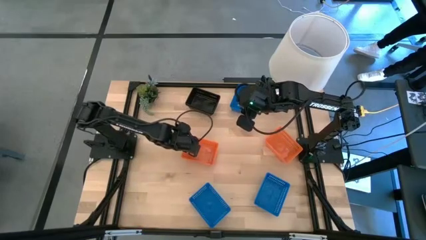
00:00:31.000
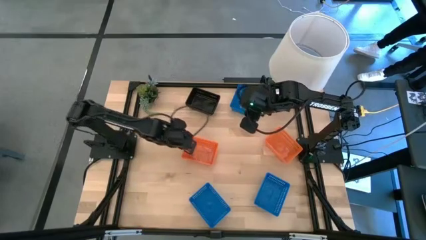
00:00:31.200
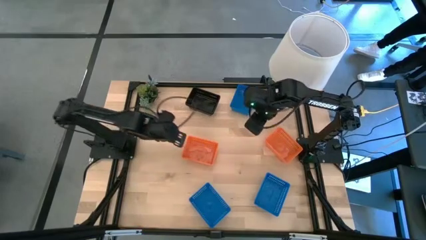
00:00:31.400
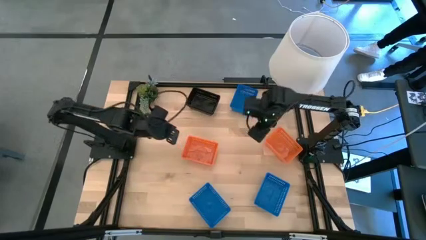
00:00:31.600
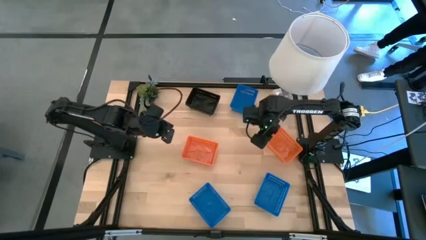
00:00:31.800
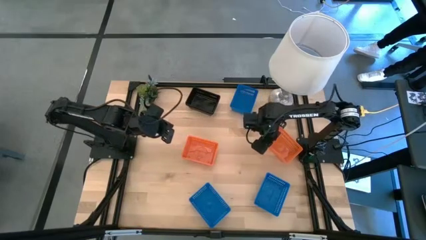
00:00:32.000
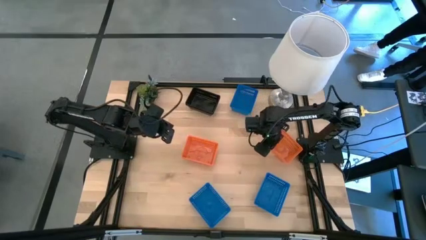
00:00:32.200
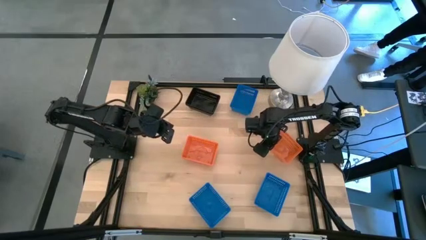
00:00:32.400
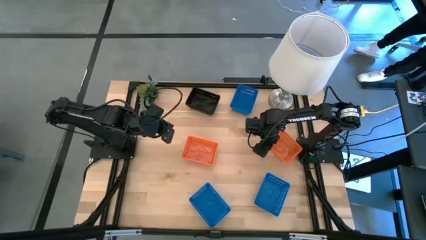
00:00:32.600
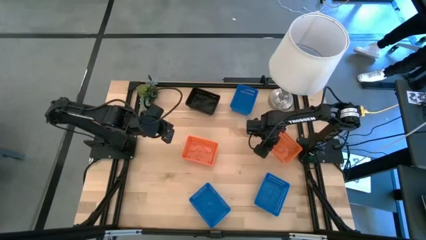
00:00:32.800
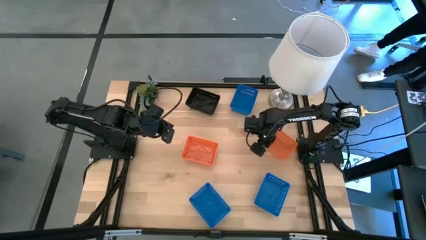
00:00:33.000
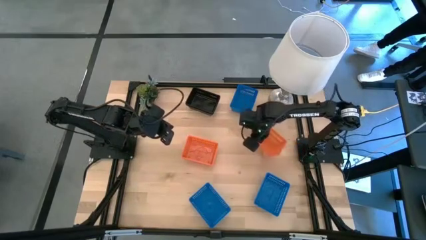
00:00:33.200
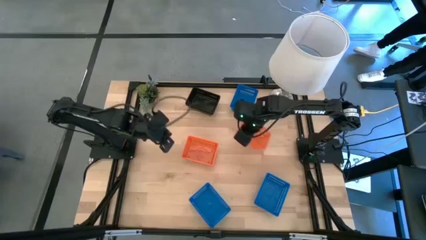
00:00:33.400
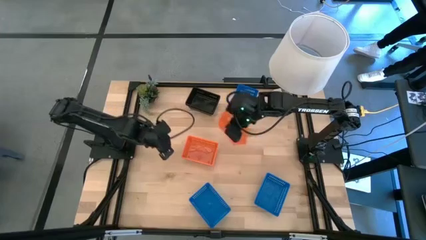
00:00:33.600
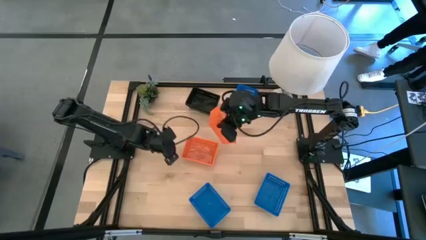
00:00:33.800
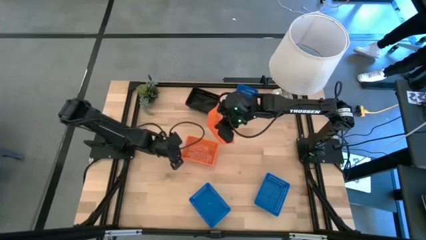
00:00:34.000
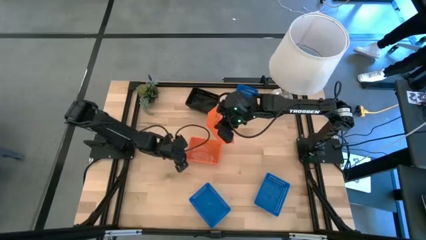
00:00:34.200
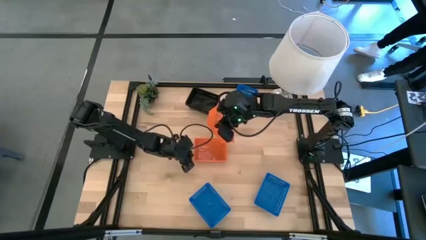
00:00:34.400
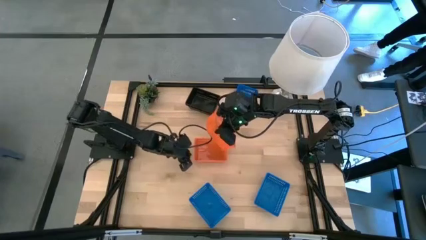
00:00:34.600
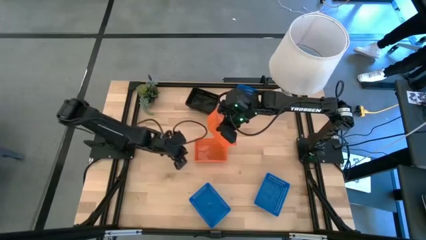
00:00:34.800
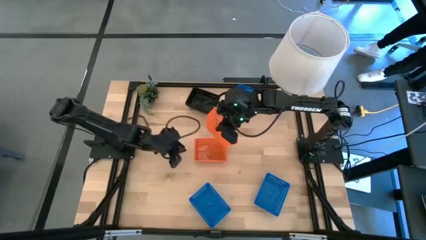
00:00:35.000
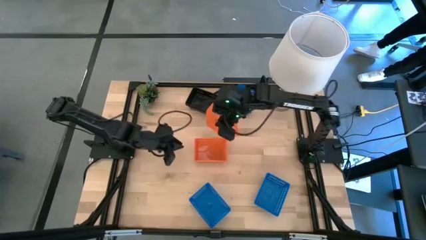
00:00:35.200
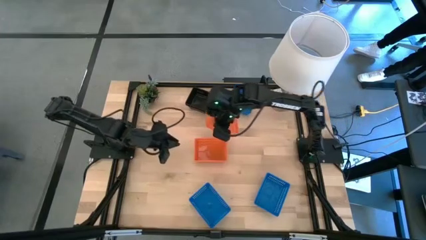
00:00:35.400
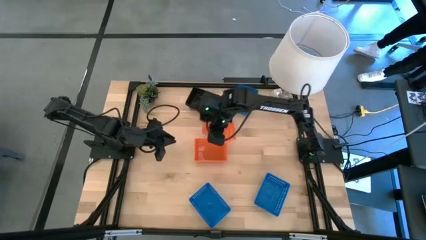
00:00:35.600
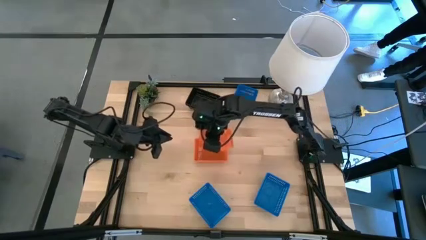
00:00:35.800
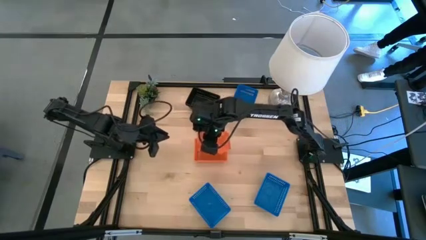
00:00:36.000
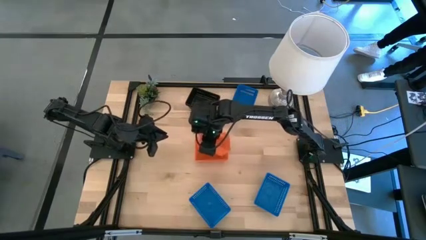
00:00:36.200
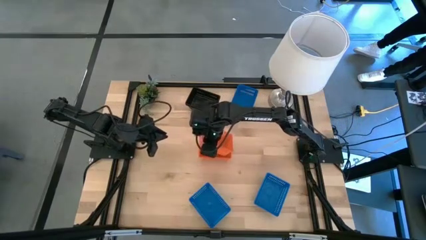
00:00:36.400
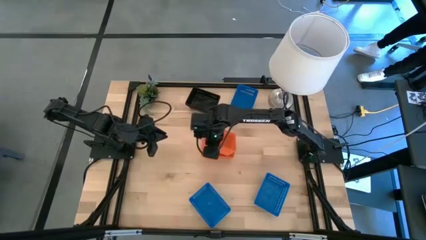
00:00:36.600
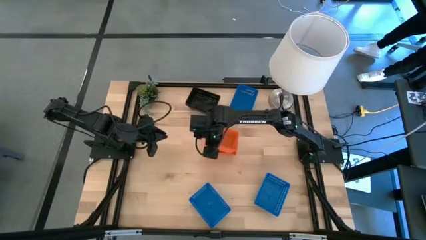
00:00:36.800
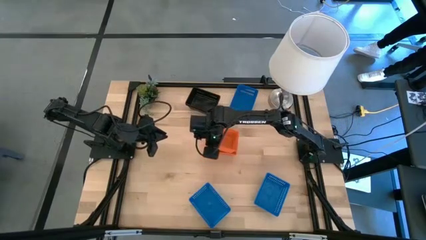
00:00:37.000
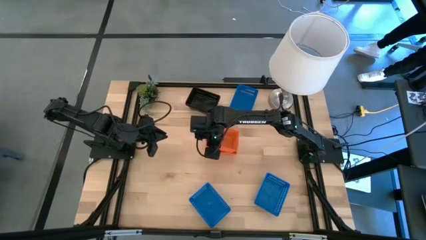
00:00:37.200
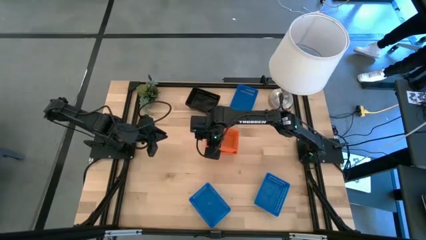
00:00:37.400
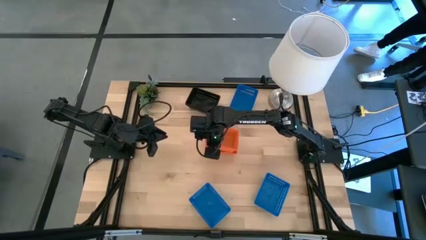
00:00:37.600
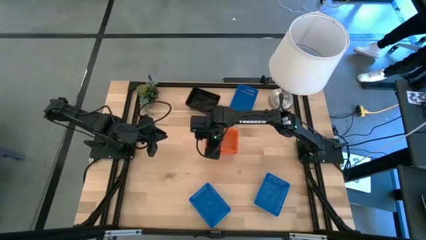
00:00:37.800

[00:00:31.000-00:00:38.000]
Stack the right orange bin on the stacked orange bin

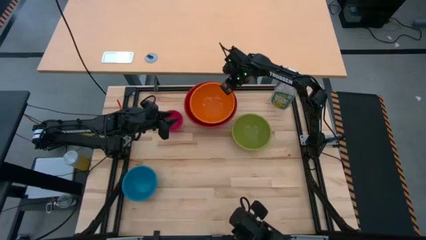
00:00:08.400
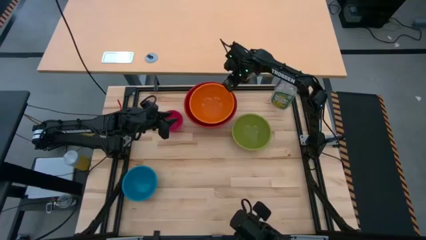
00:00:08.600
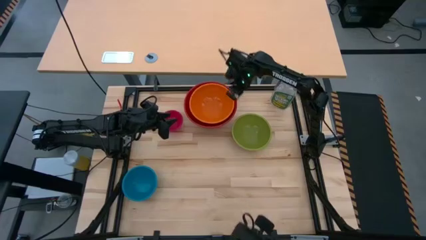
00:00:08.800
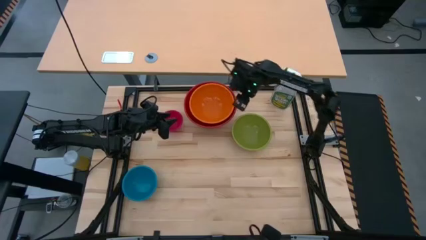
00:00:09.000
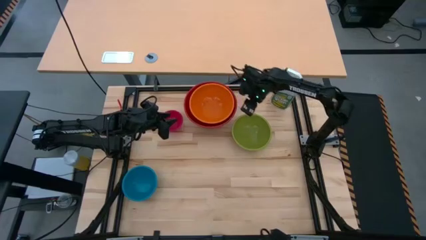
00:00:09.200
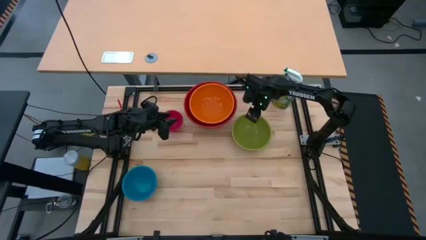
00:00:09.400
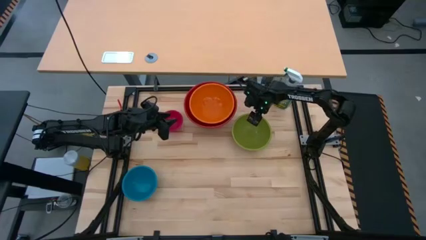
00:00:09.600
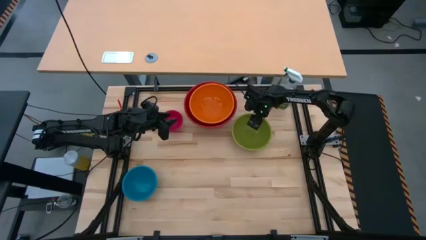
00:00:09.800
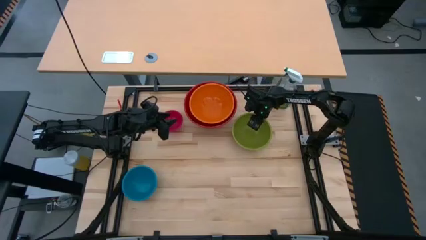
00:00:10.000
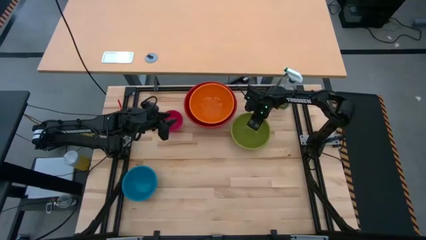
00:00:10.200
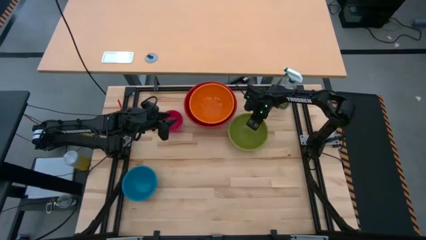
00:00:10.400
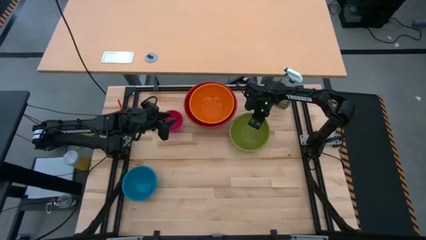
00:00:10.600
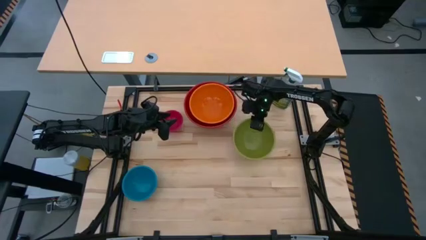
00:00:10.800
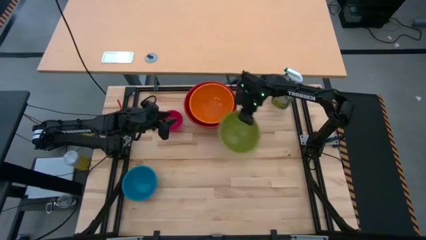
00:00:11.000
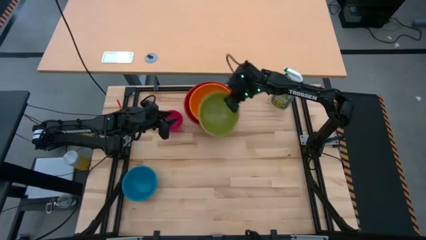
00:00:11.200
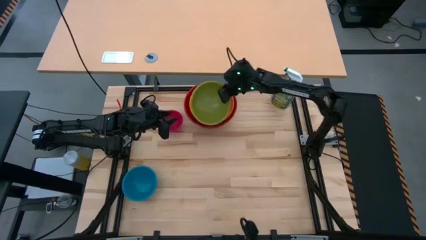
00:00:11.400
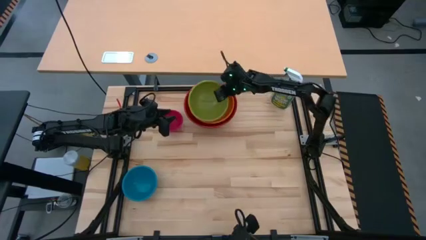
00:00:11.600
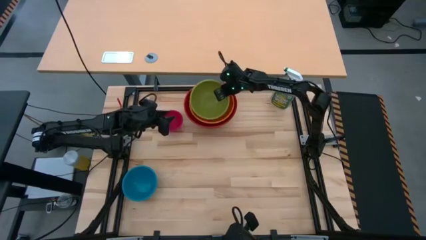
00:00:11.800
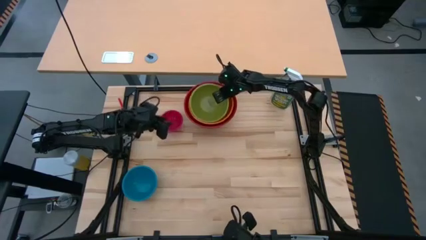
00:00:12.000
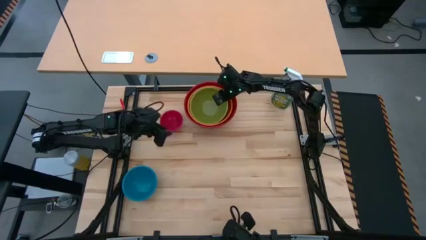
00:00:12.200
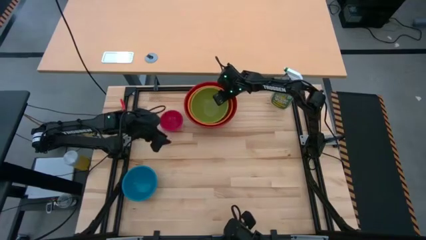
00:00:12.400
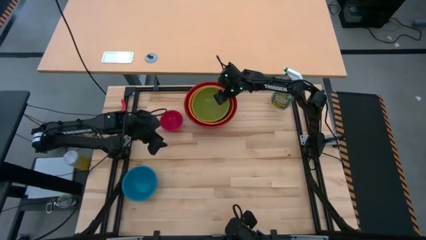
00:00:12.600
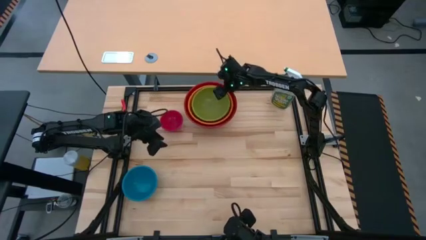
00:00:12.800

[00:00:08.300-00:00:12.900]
Stack the green bowl on top of the orange bowl

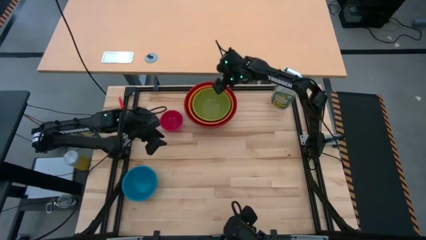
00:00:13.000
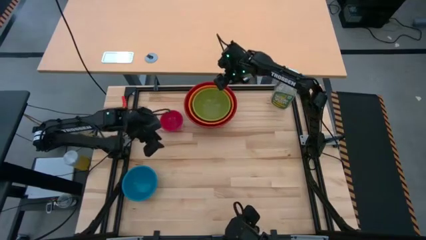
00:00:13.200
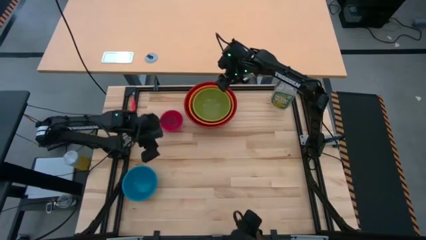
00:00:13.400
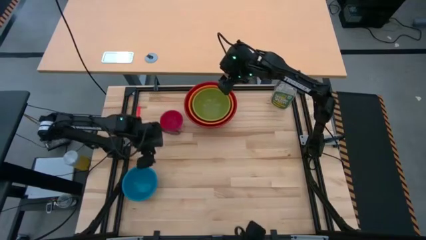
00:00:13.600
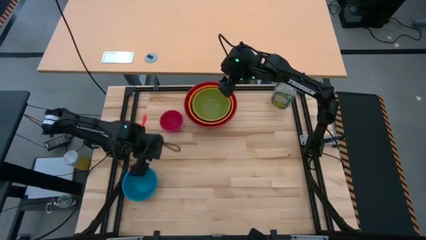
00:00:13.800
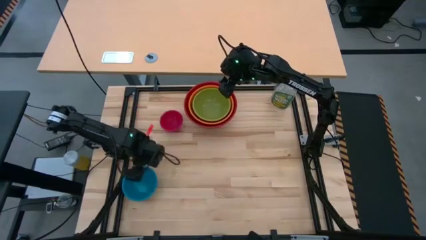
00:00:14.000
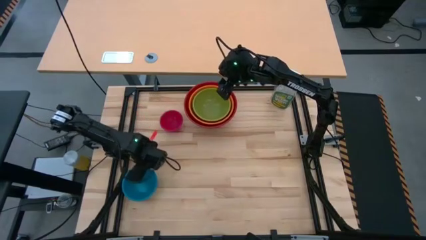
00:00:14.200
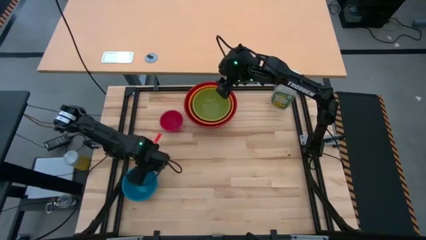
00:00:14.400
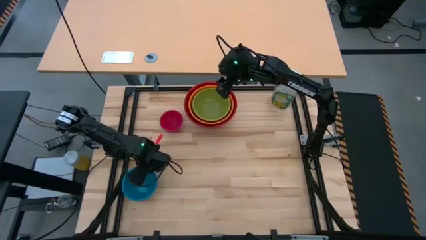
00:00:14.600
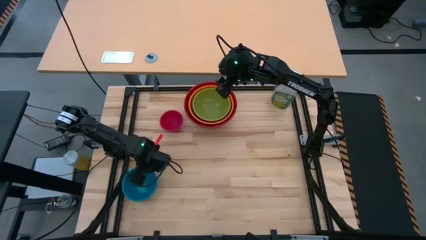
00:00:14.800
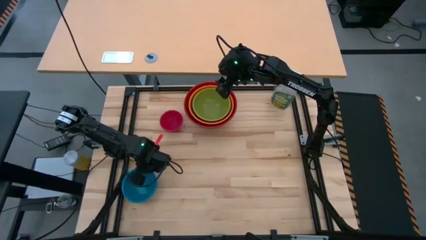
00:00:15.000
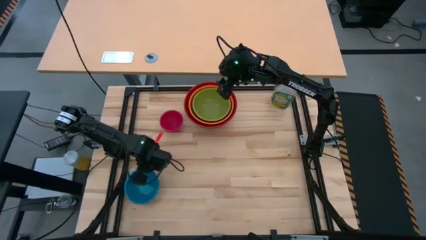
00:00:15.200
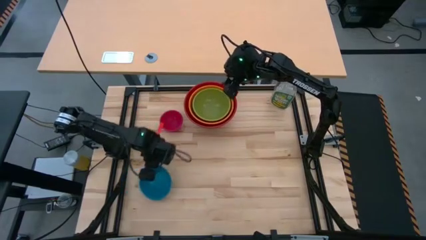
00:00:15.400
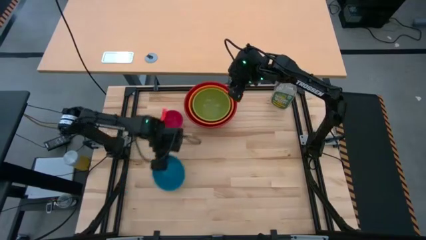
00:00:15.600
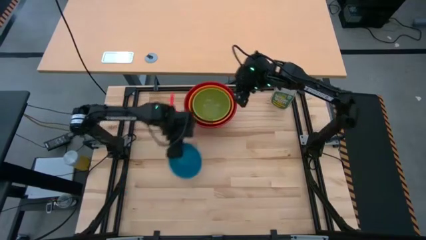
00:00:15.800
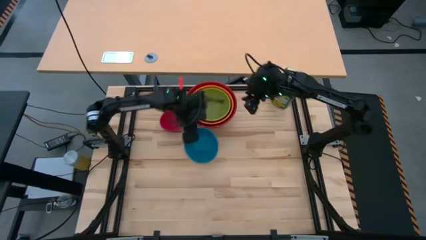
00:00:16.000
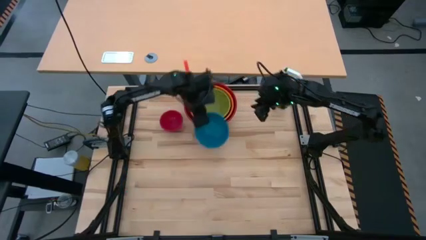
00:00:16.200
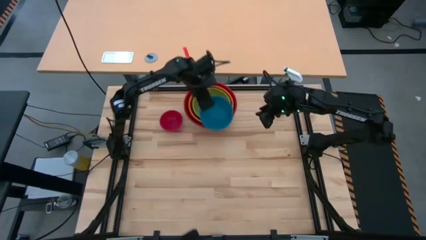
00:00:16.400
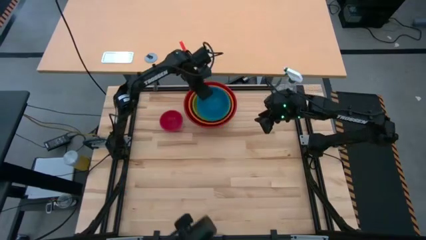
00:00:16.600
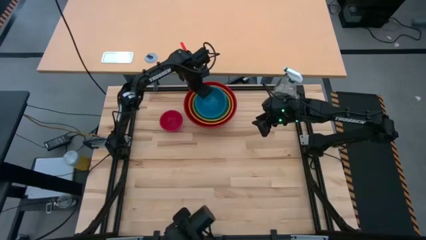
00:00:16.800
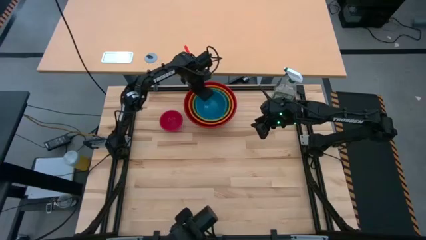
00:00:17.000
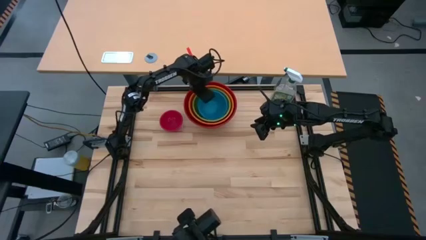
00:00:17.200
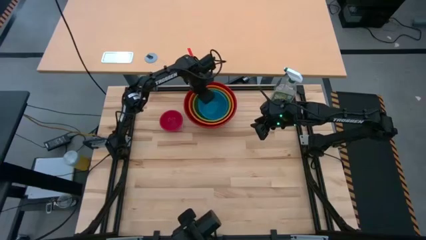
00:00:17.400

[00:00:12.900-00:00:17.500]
Stack the blue bowl on top of the green bowl
